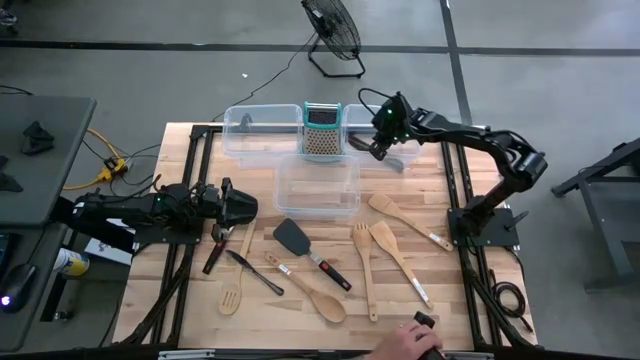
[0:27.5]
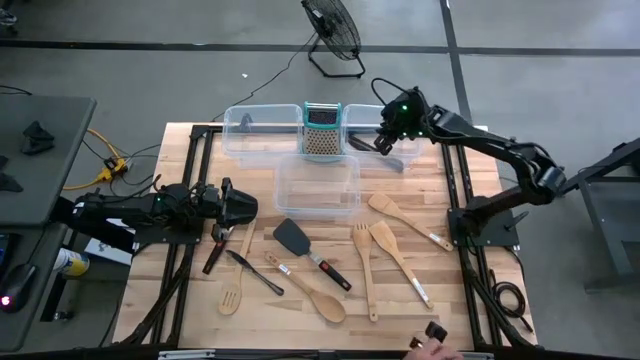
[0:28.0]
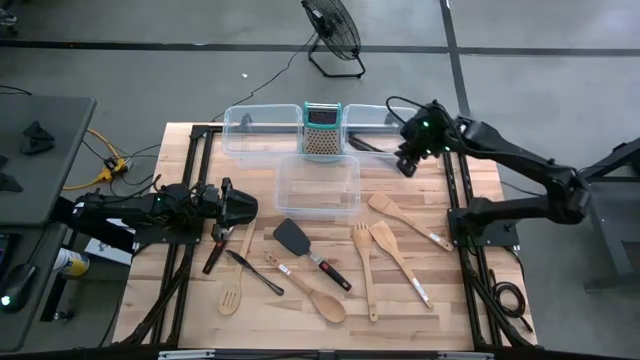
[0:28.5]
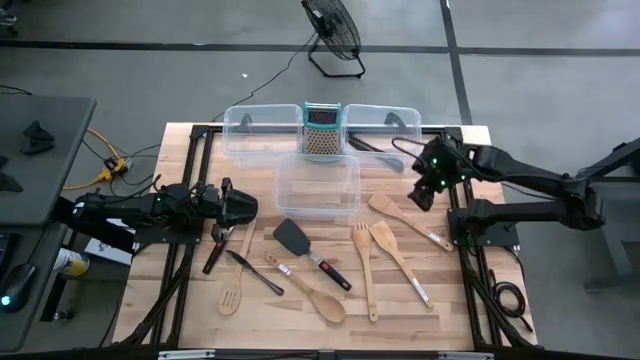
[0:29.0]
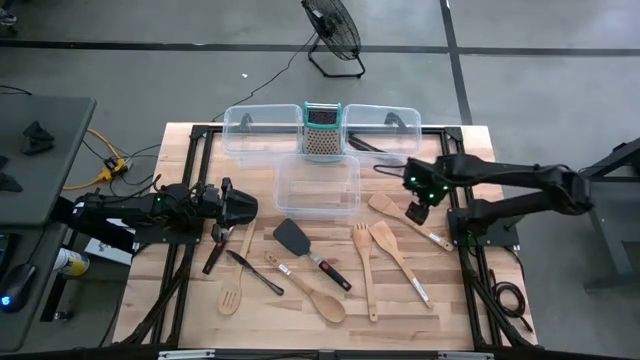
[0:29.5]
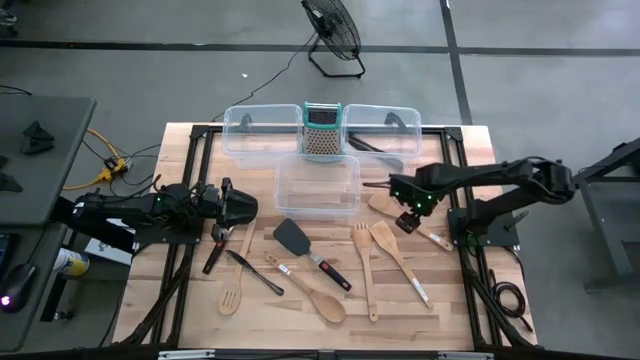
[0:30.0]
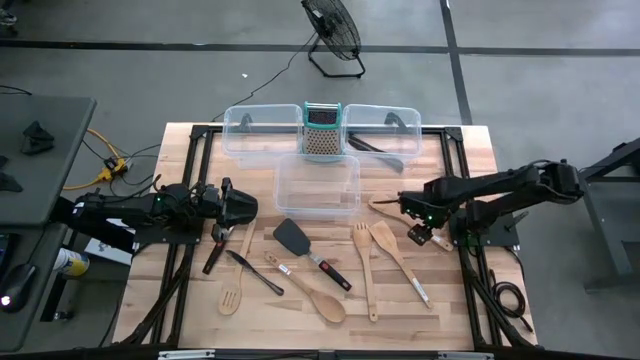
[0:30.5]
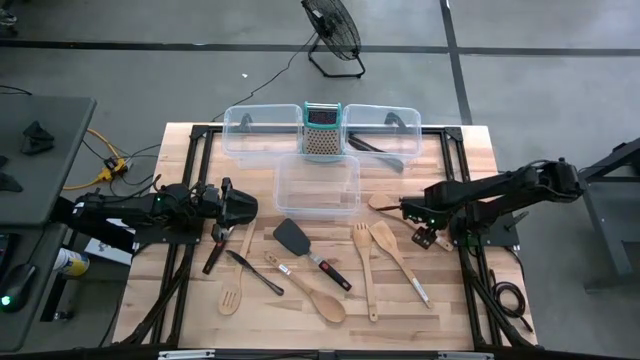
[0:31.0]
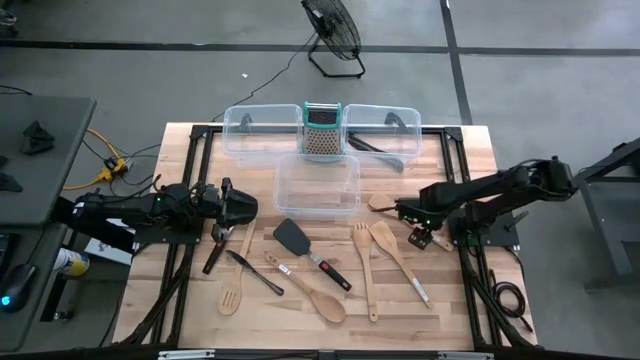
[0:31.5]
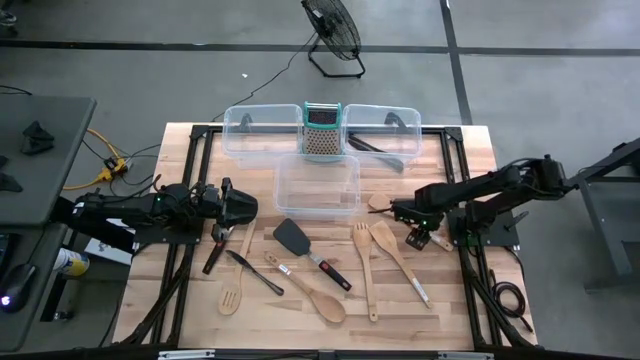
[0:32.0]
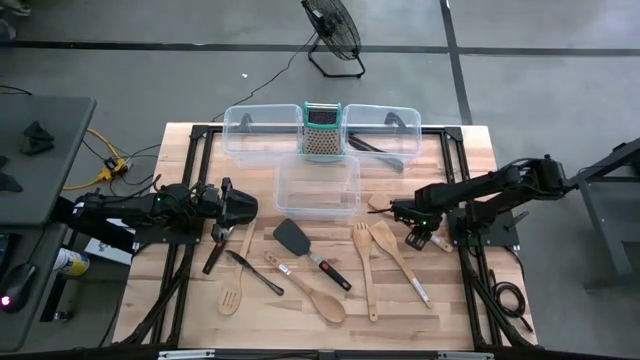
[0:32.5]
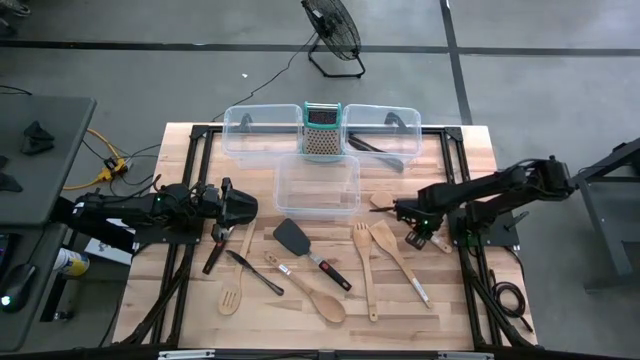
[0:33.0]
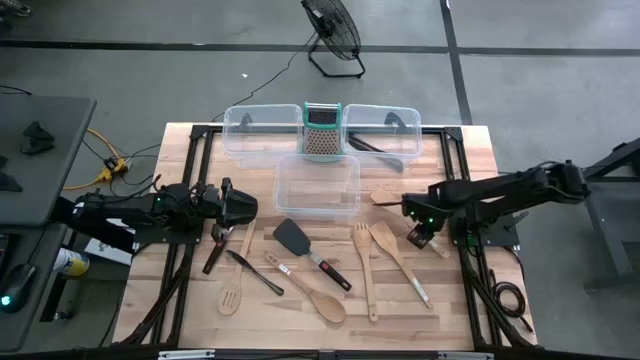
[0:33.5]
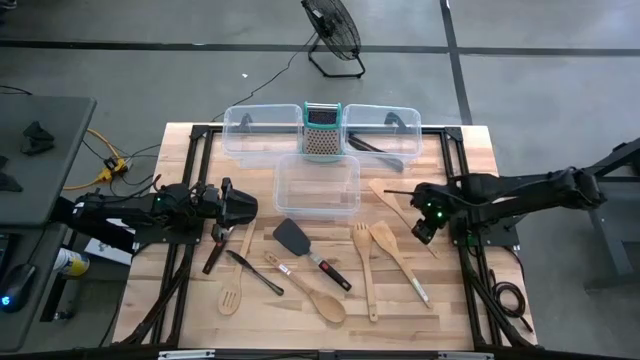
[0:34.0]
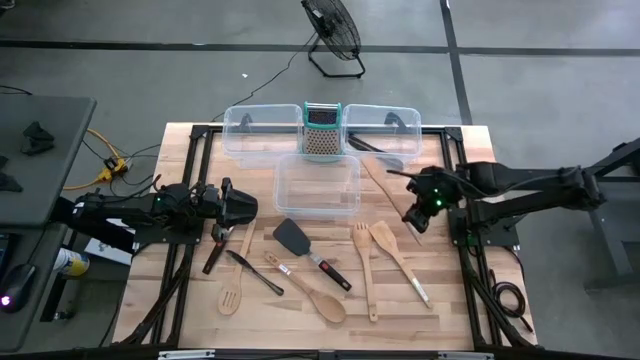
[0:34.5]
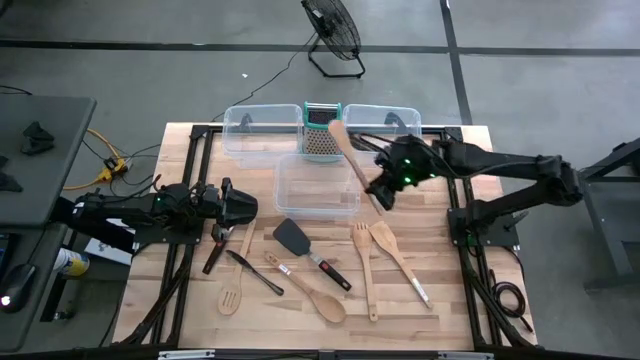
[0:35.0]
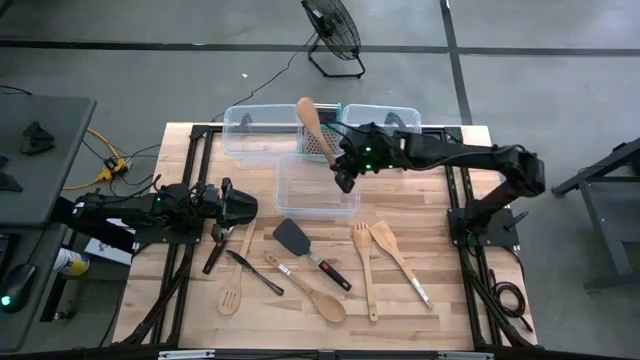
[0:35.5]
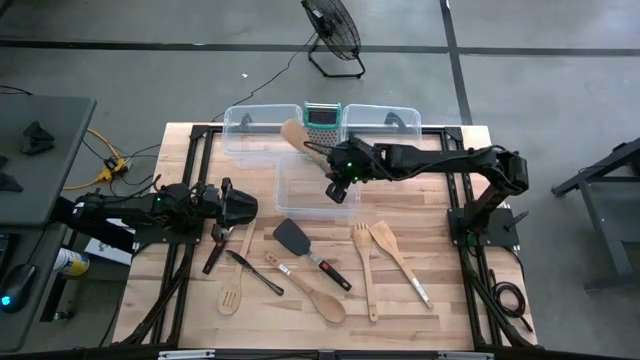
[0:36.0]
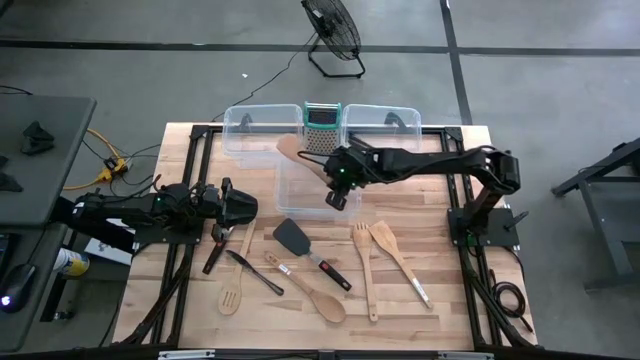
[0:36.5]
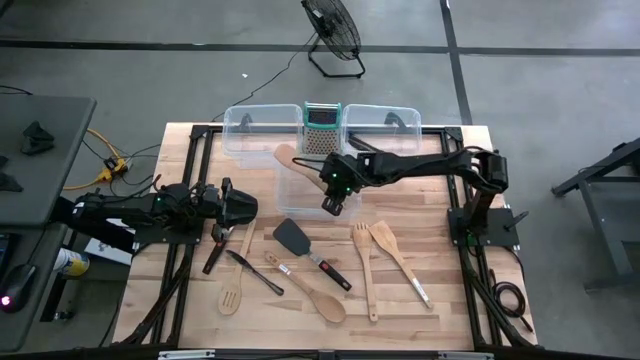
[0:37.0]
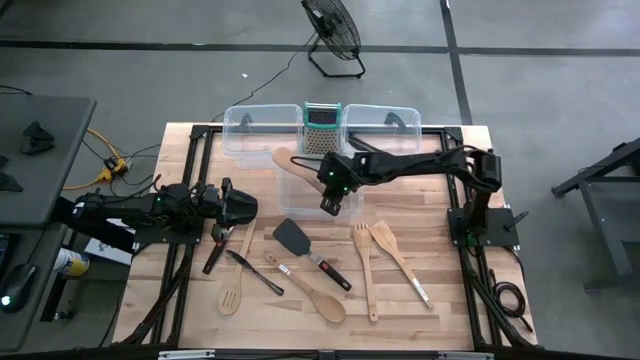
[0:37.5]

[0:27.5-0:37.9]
Task: Pick & Place Kitchen Items
Put the light brown spatula into the middle transparent bin

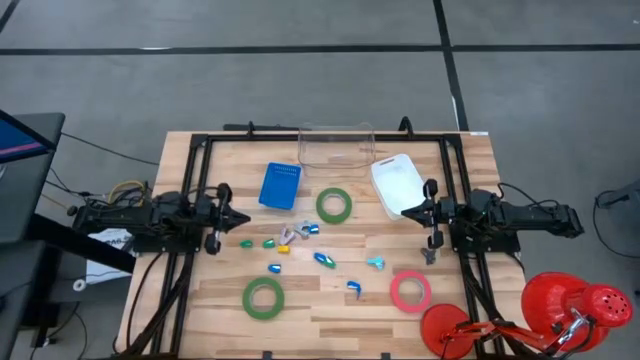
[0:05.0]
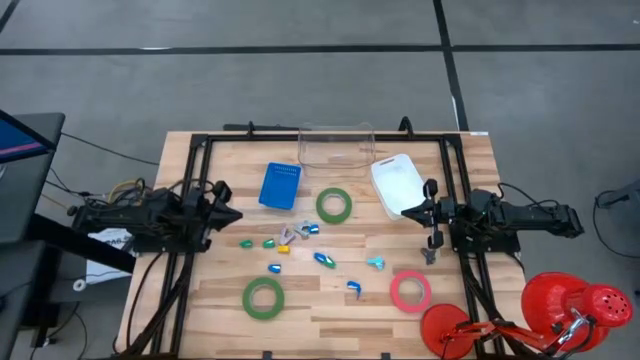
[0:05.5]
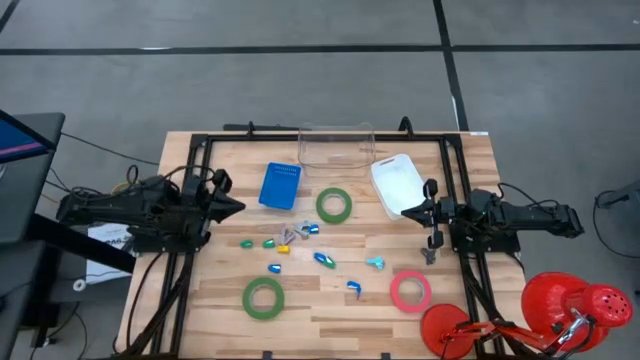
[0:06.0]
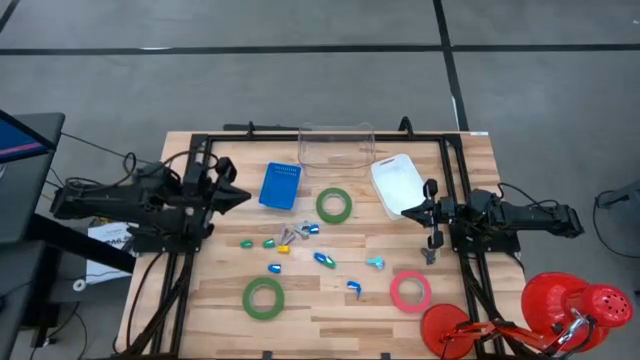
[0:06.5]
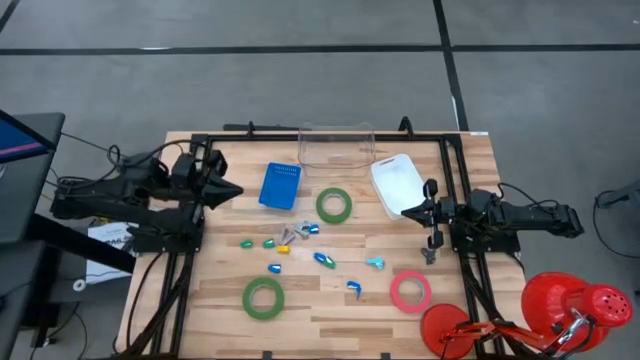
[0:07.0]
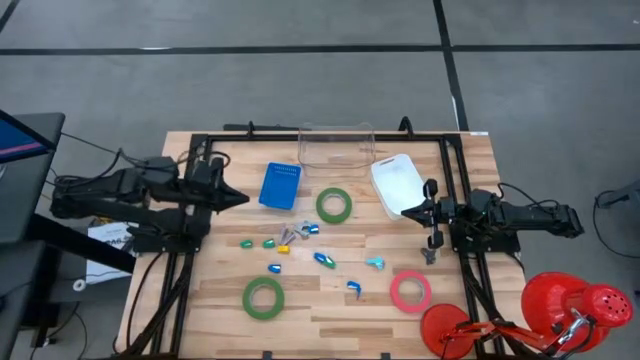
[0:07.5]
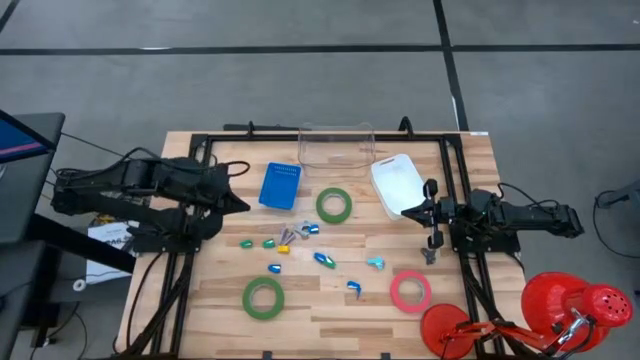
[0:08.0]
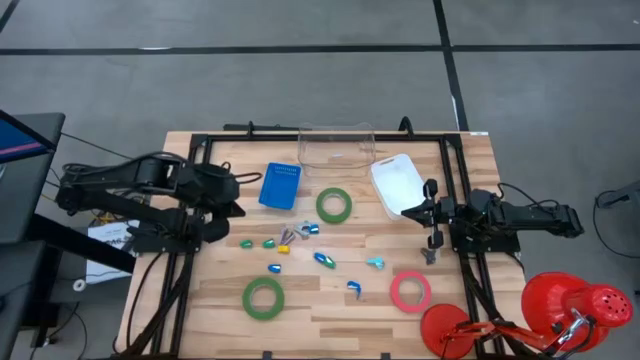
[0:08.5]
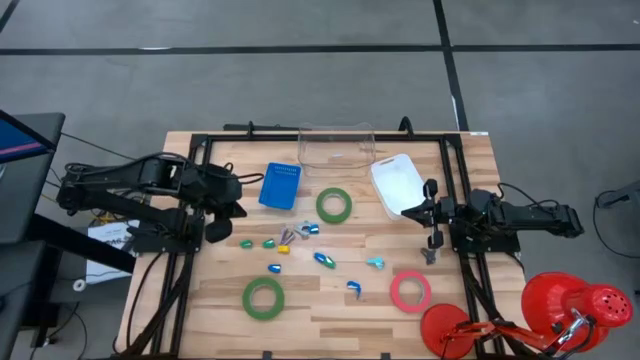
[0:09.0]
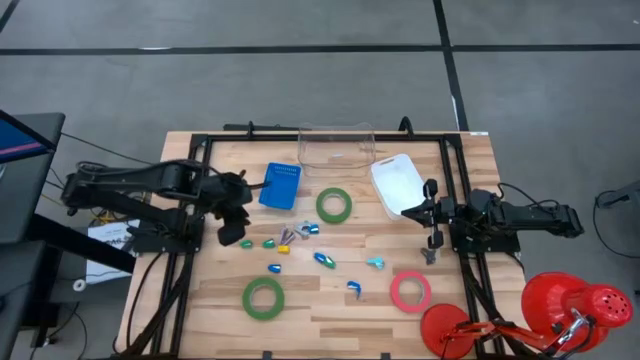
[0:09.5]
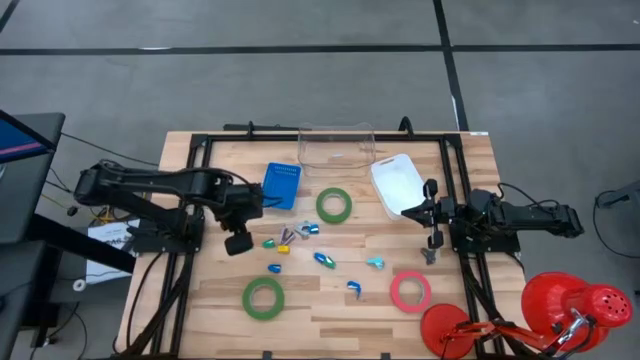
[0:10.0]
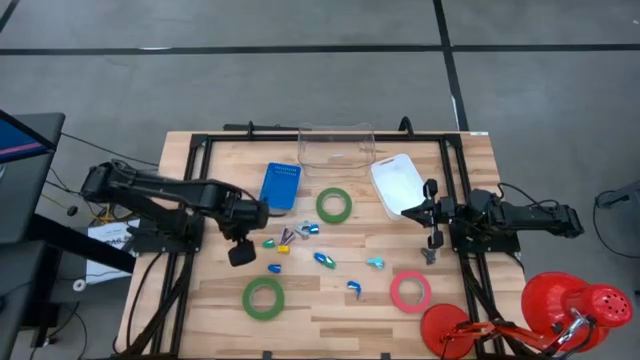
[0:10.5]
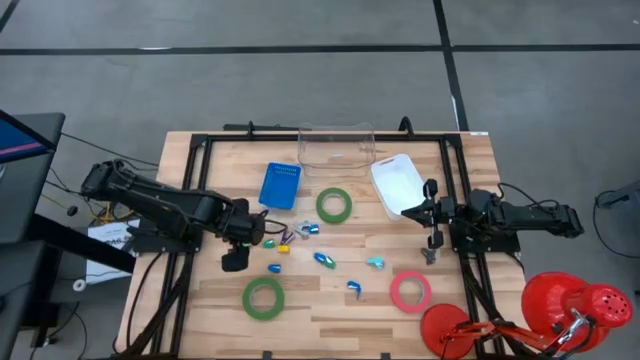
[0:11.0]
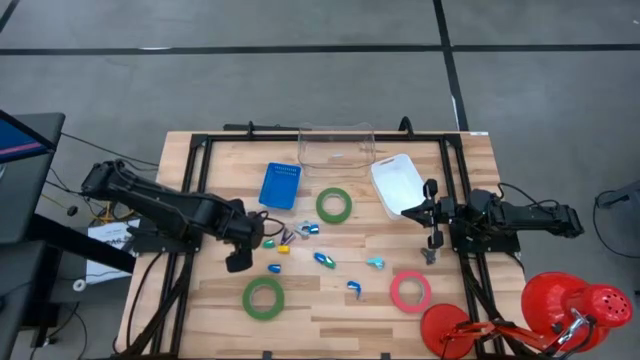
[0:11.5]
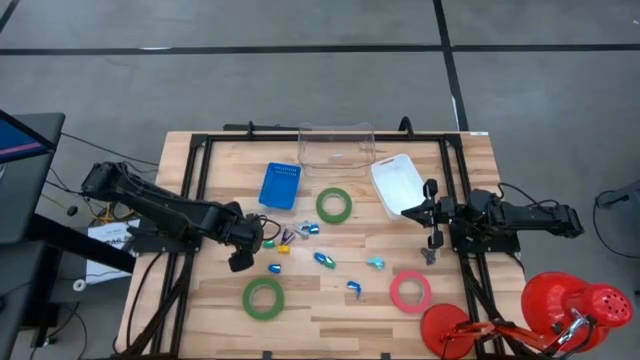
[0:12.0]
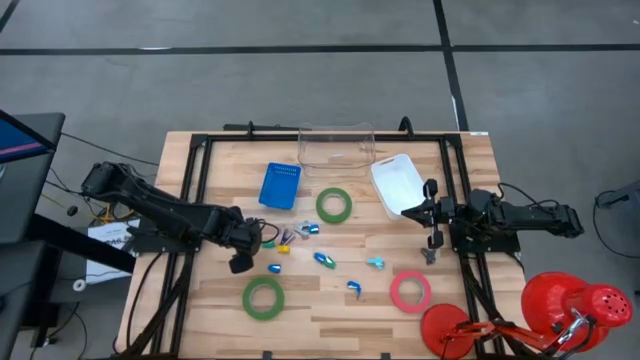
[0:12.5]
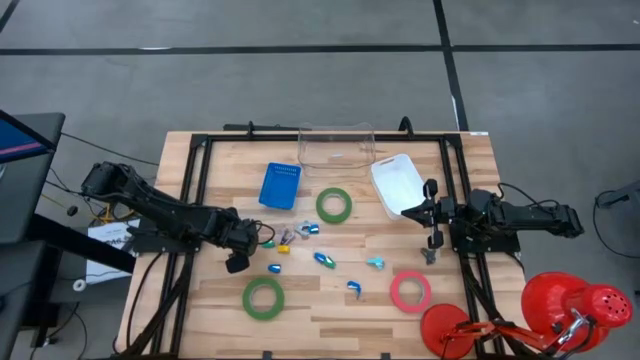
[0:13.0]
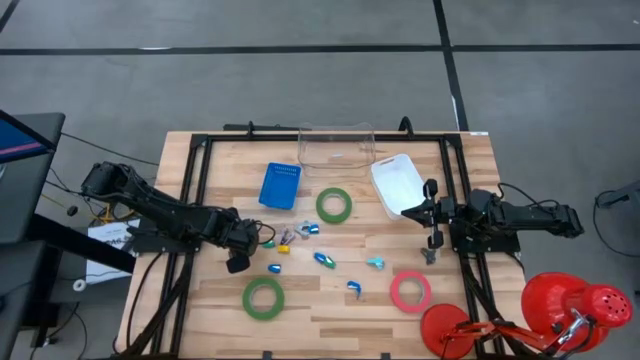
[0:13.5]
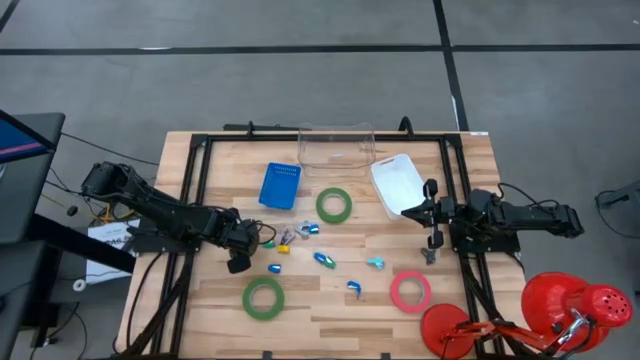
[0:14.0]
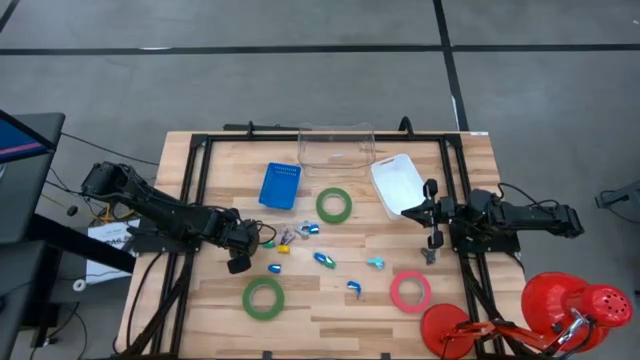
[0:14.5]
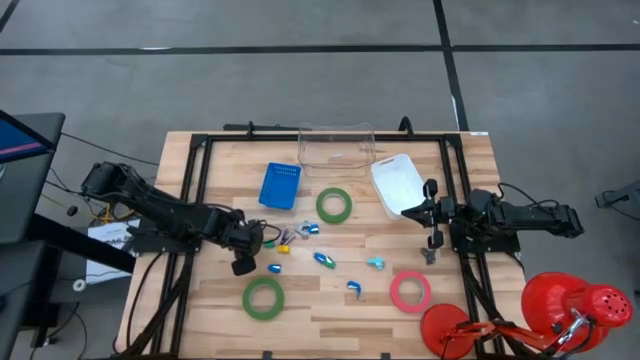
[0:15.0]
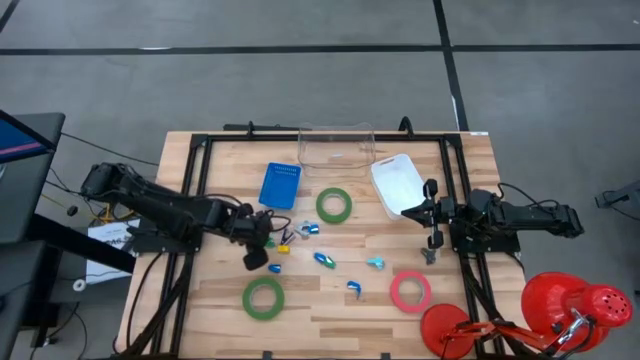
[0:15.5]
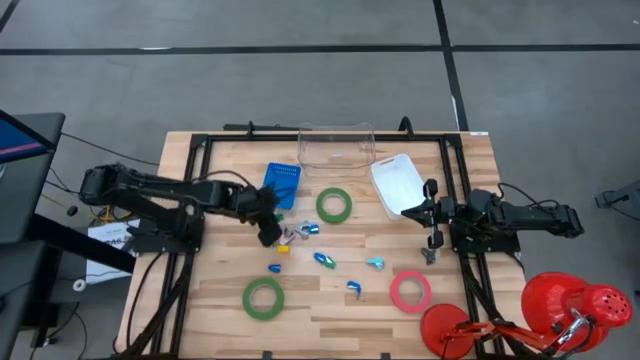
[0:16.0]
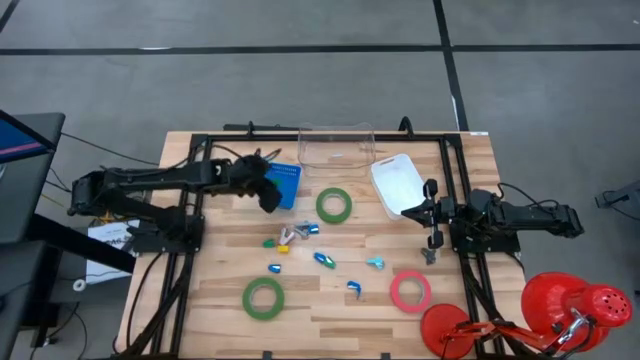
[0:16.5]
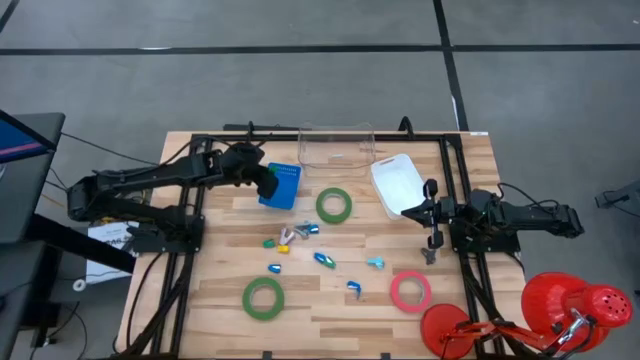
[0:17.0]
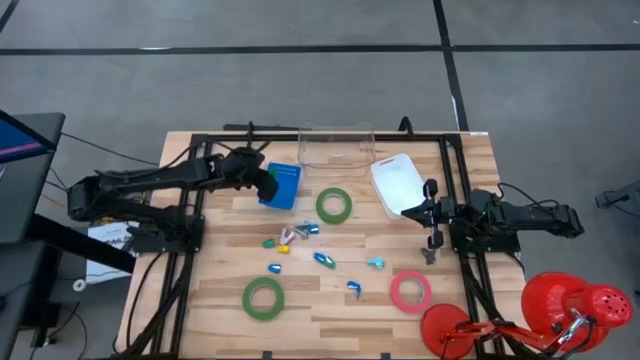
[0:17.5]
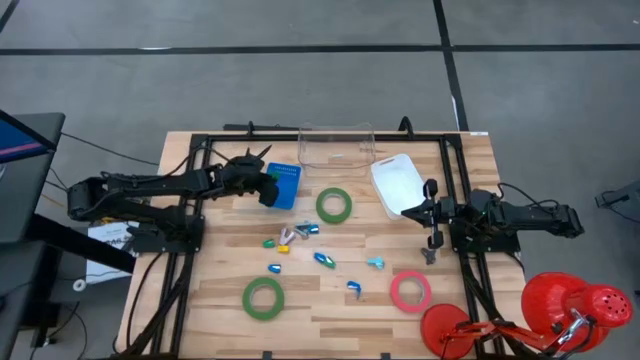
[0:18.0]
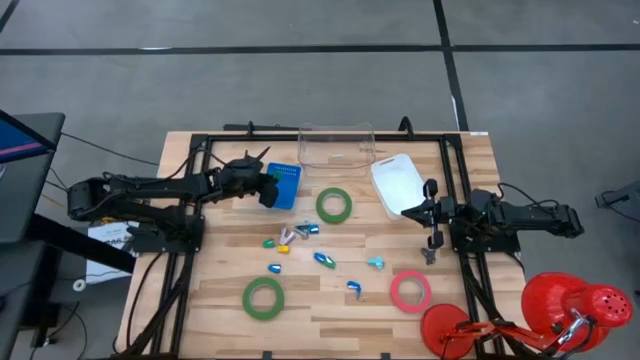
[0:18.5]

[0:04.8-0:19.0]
Task: Pick and place Stapler, Stapler remover, tape
Put the top left green stapler into the blue bin
